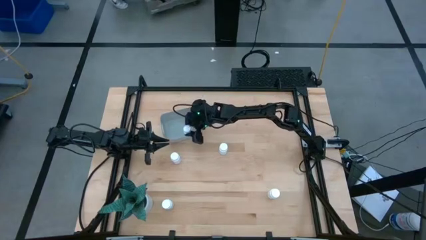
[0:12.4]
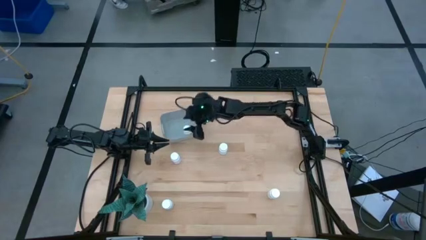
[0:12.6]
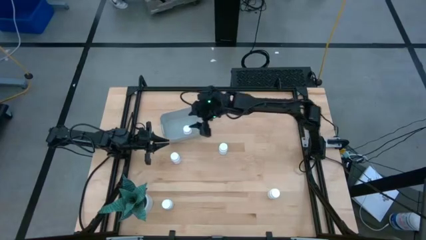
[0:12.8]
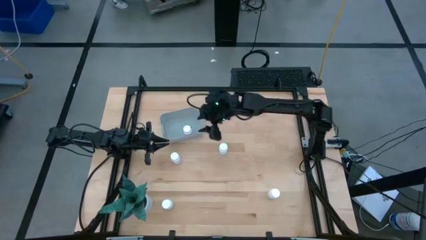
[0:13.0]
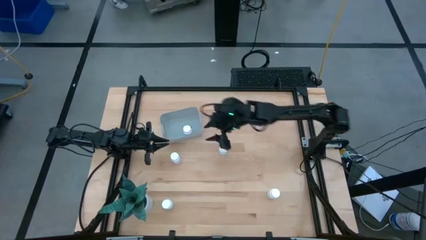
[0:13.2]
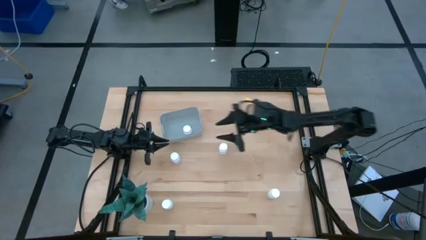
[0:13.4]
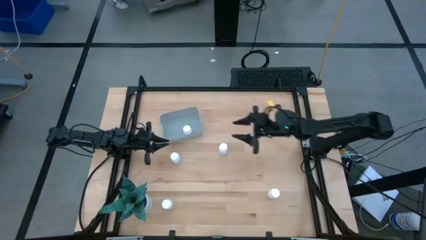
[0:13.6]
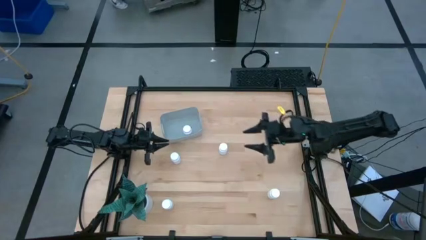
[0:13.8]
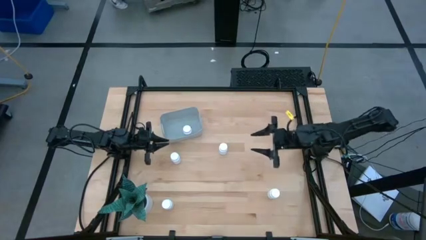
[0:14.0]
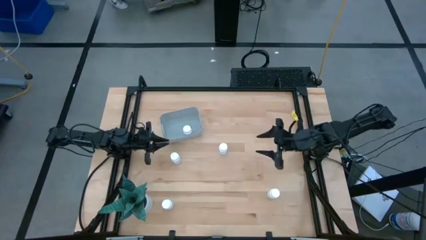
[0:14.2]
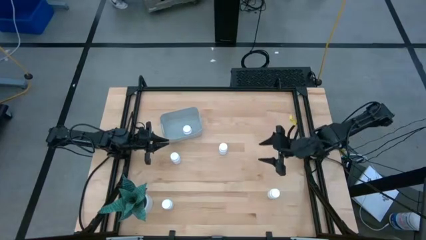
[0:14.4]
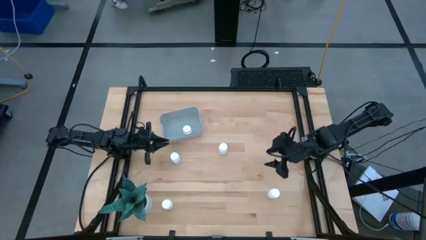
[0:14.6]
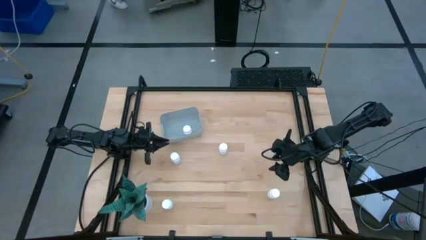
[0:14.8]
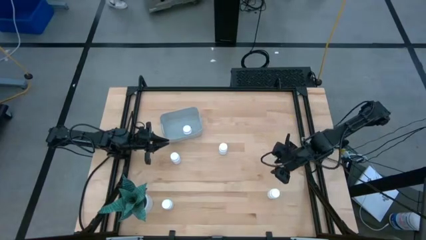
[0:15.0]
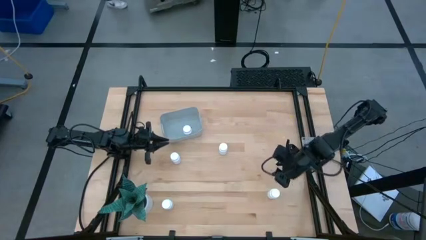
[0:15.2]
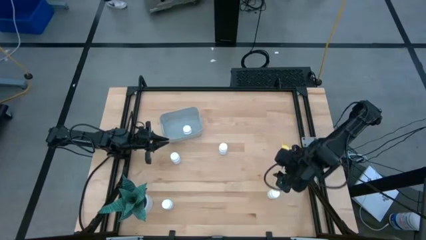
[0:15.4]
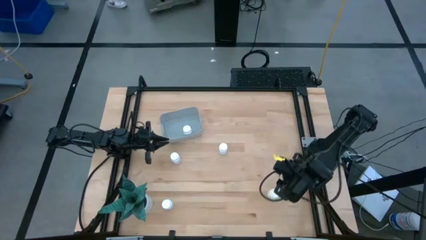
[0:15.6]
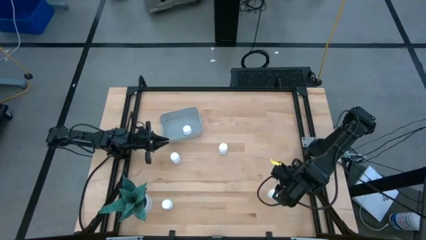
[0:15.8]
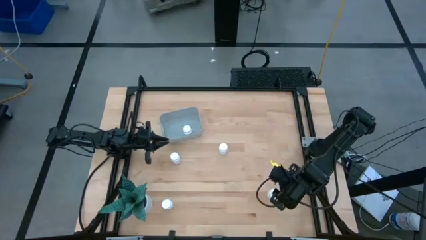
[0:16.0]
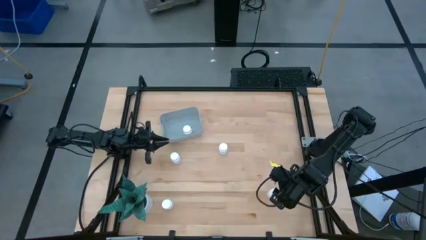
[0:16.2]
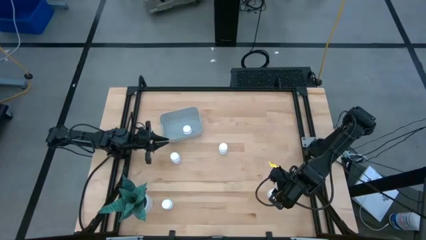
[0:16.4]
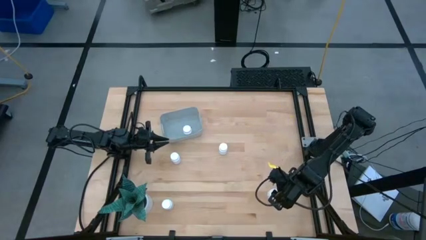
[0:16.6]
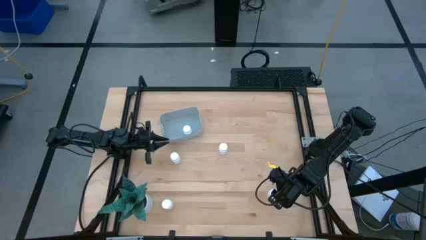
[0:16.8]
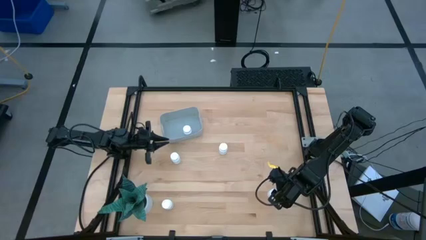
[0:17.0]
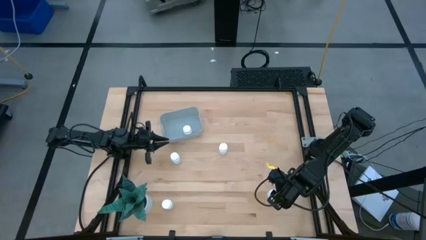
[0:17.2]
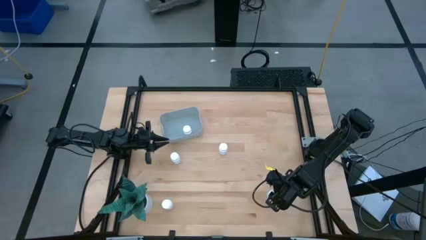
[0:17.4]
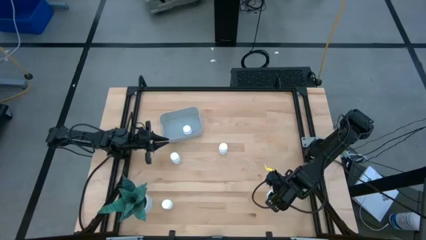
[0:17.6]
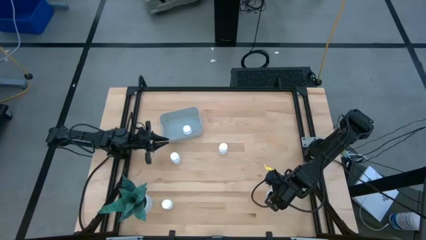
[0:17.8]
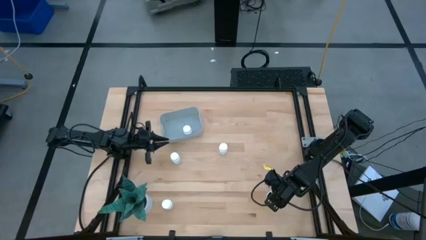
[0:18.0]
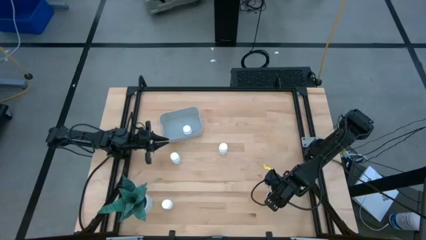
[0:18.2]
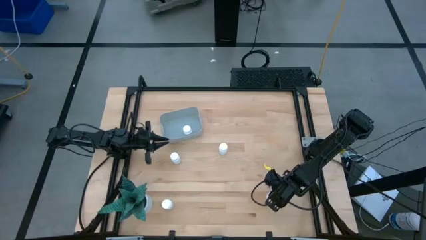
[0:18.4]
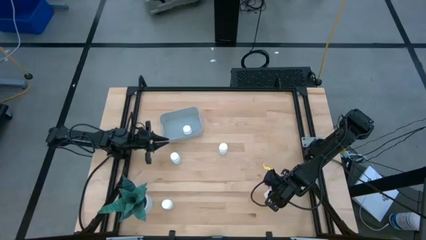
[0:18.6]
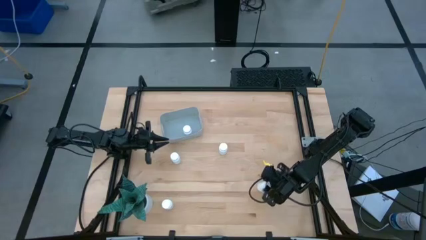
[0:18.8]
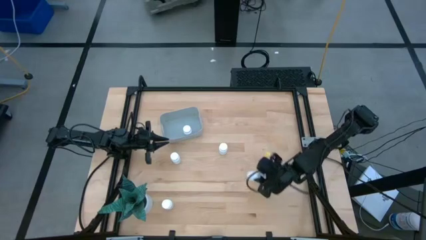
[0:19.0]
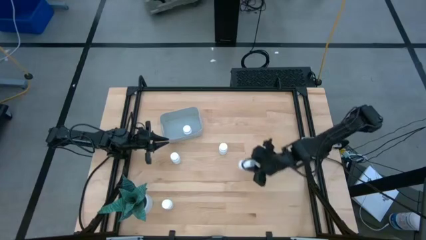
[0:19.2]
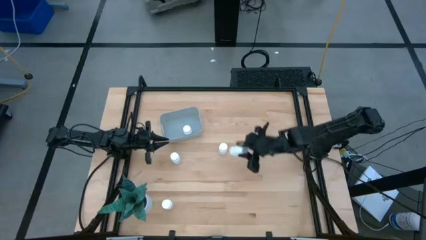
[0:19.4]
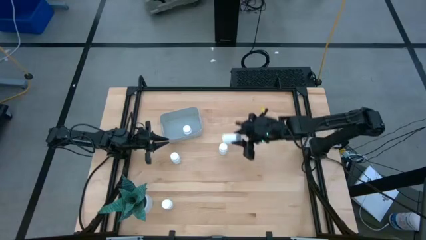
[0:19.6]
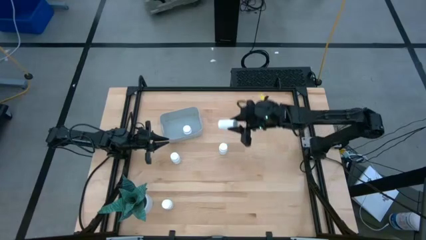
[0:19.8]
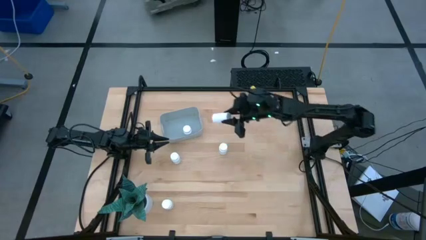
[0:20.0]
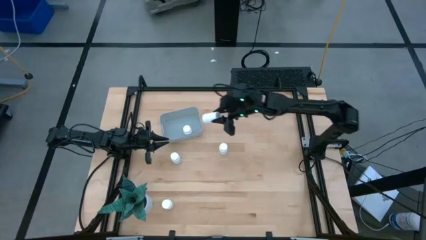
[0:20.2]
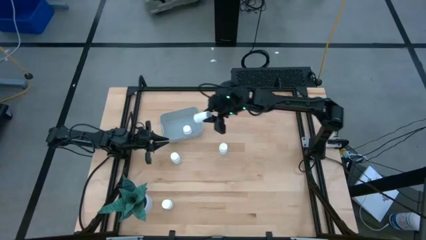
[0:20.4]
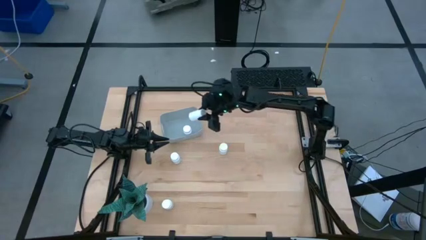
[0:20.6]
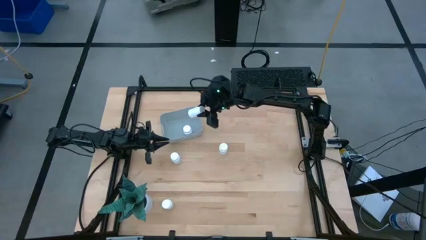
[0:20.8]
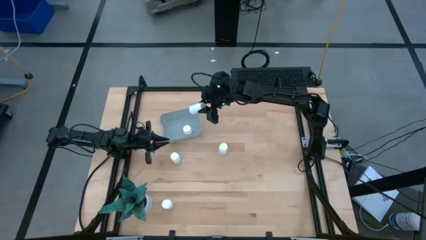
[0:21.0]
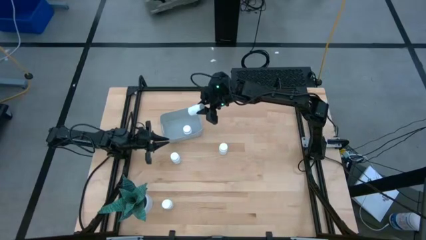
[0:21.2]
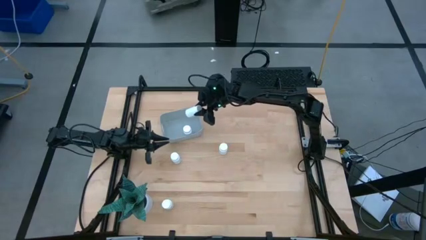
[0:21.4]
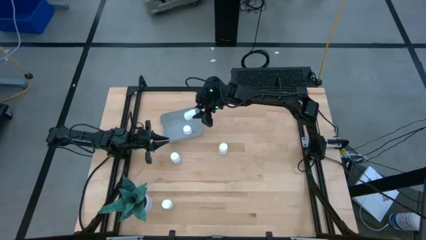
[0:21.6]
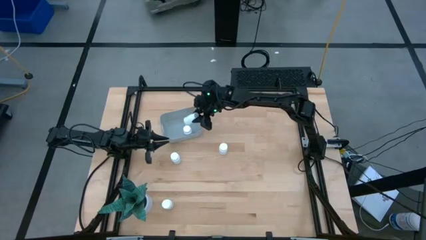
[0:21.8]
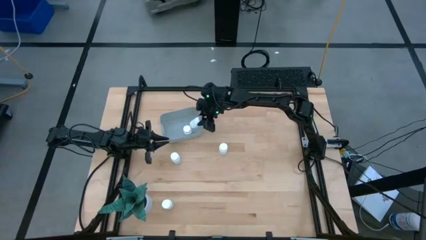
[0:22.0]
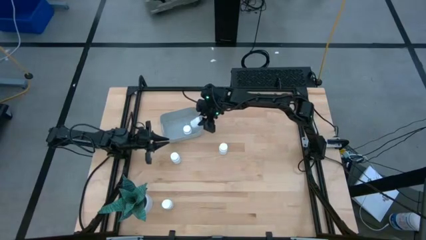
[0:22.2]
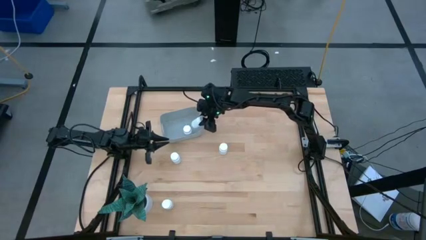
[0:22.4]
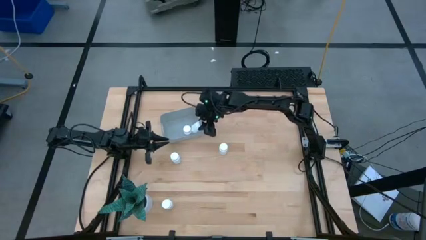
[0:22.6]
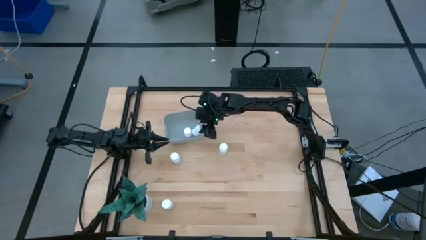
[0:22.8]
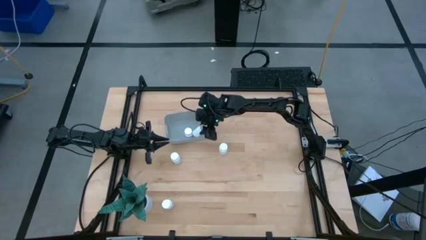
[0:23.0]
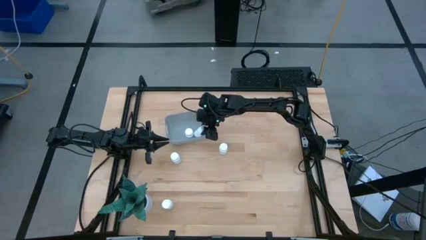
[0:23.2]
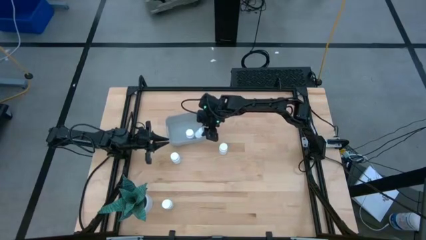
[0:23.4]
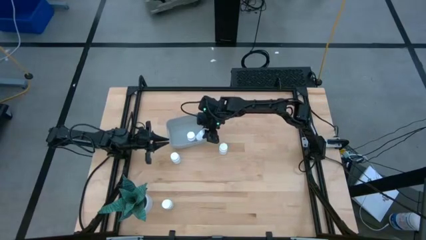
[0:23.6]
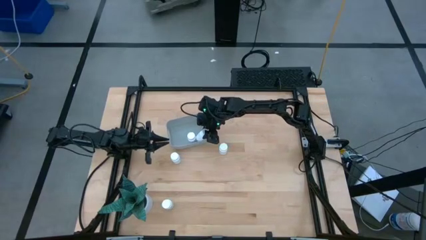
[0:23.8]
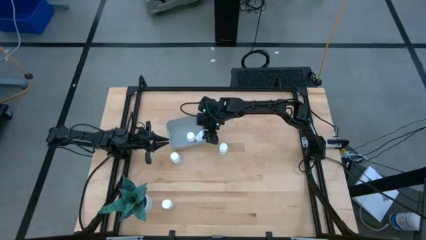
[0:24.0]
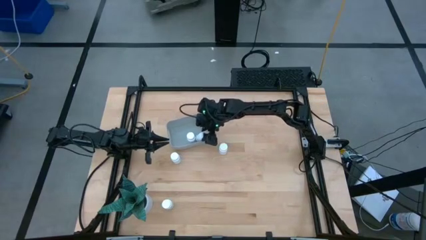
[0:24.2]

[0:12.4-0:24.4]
Task: Pick and place pill bottles into a basket
Put the white pill bottle in the gray bin

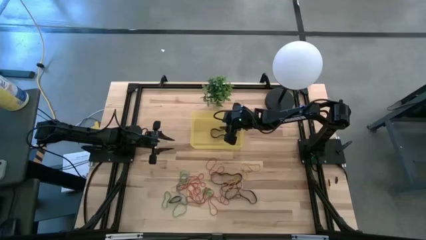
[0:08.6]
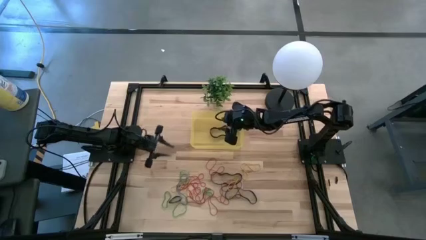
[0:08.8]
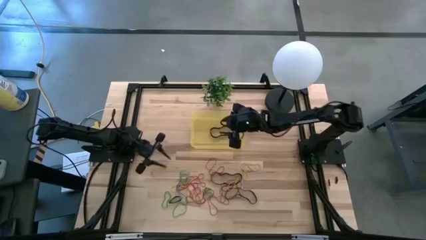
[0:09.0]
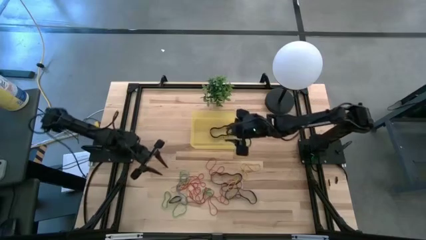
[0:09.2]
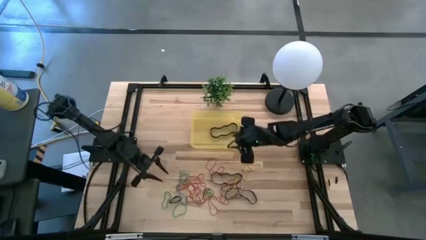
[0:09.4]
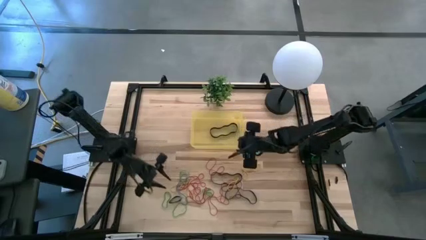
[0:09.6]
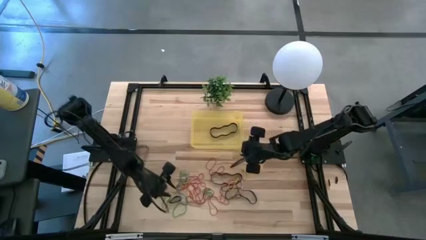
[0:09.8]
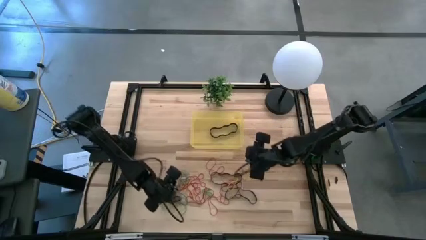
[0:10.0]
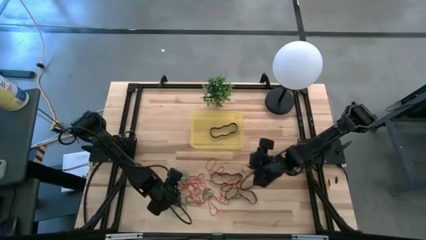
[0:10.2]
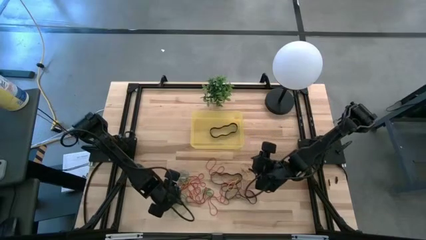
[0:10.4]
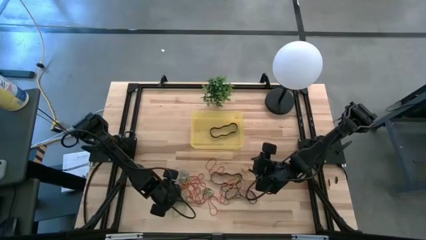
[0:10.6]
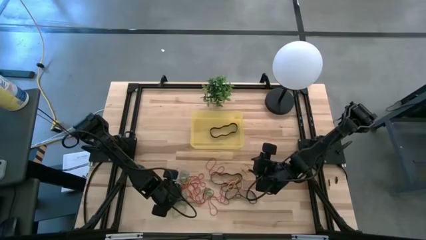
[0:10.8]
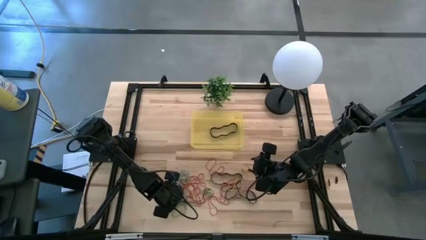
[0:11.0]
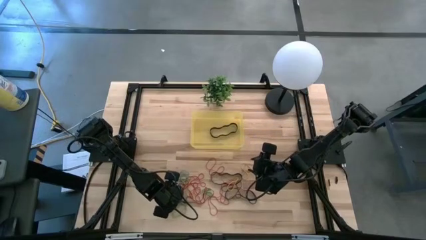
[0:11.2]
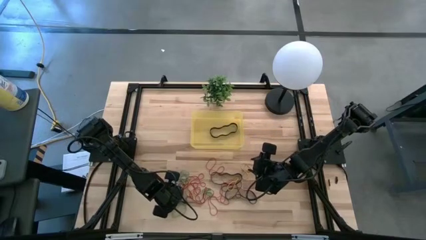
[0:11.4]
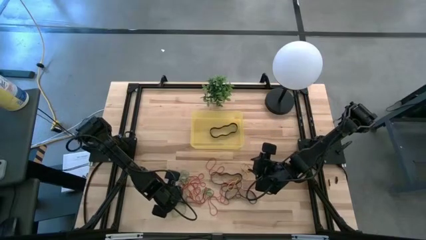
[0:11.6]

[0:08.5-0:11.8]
Task: Pick and place rubber bands into bin
Put the black rubber band into the yellow bin

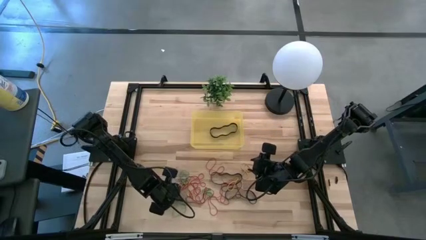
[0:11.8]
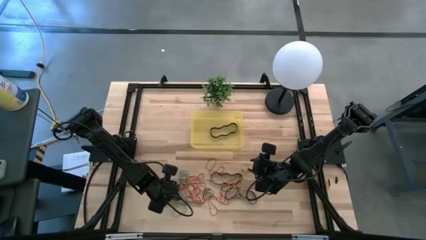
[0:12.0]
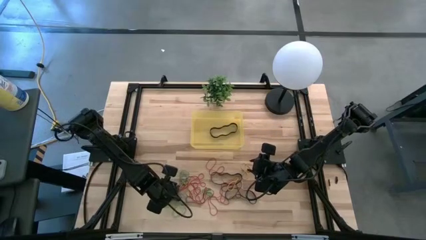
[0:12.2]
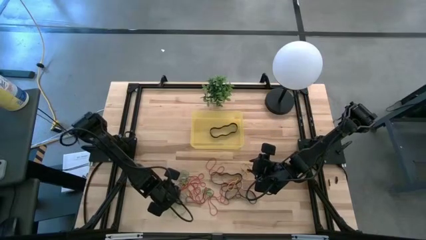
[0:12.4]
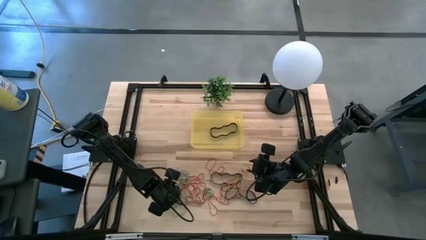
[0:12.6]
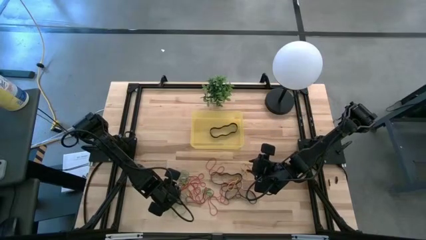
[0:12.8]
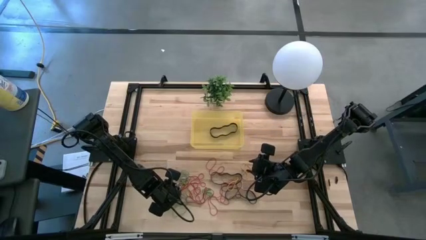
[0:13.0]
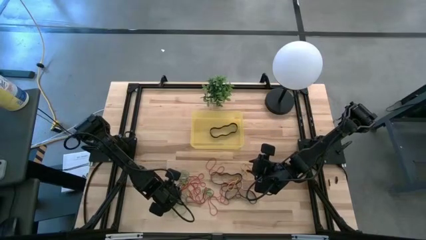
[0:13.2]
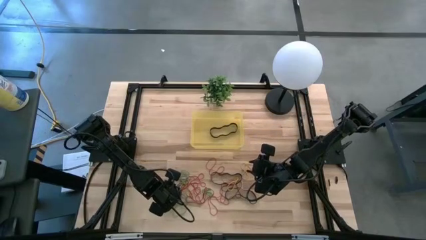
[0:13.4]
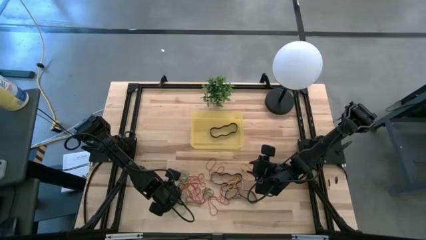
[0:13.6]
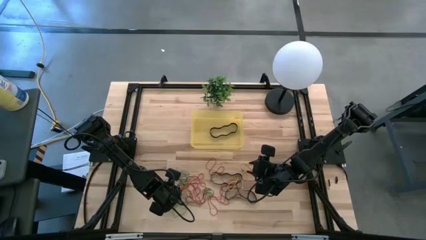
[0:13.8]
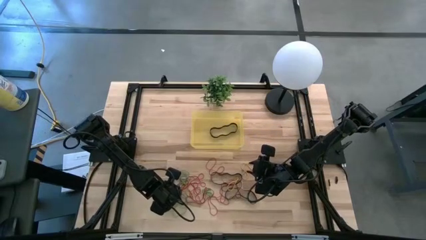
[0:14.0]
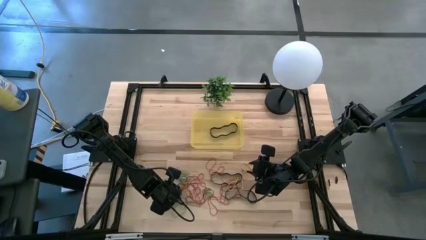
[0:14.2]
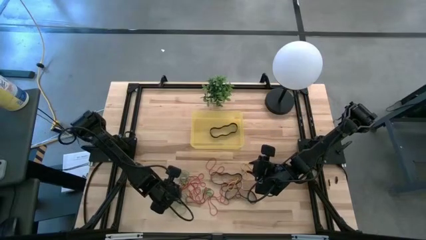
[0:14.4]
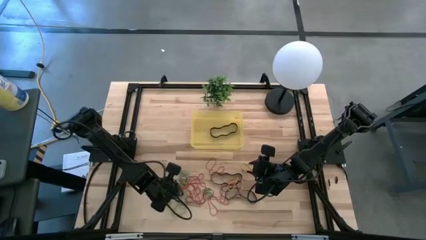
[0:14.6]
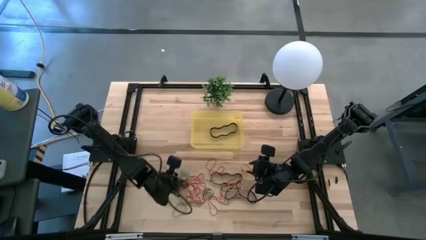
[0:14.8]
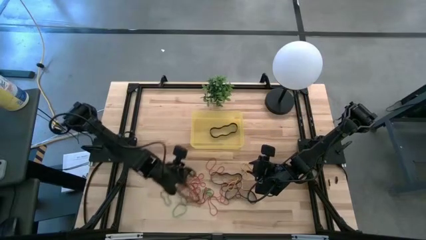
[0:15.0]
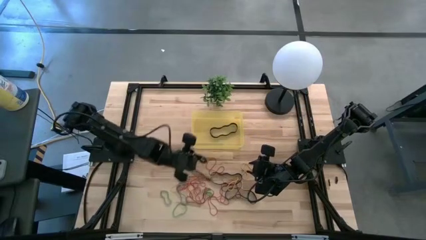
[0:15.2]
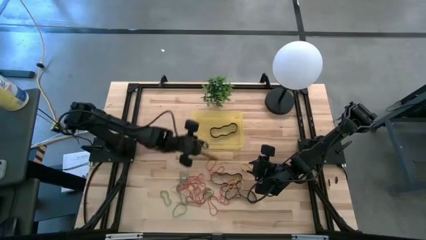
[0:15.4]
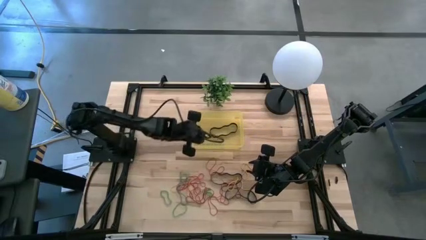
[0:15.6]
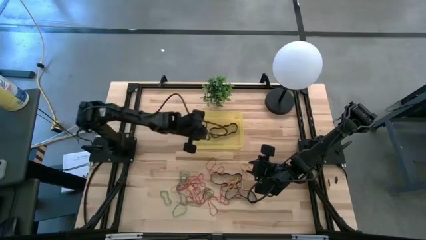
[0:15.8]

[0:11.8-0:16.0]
Put the black rubber band into the yellow bin
